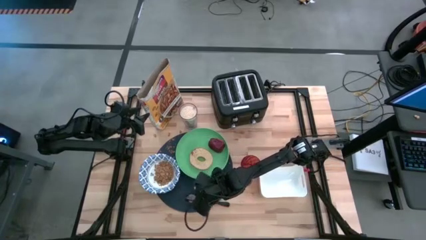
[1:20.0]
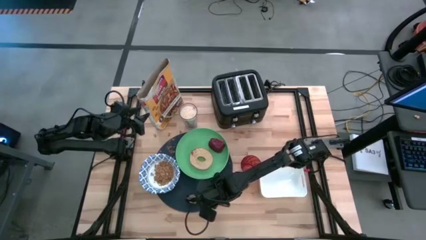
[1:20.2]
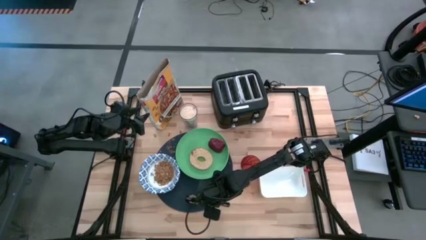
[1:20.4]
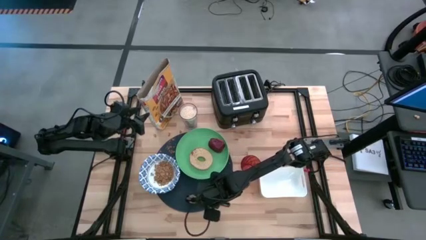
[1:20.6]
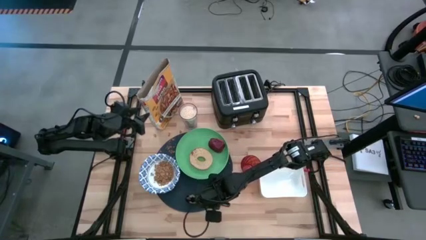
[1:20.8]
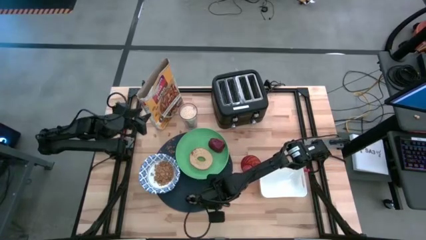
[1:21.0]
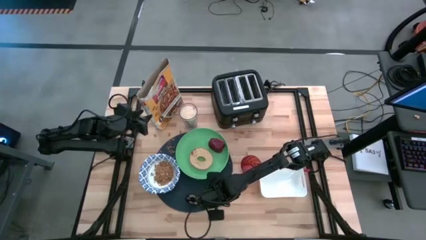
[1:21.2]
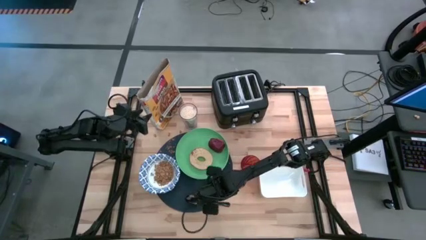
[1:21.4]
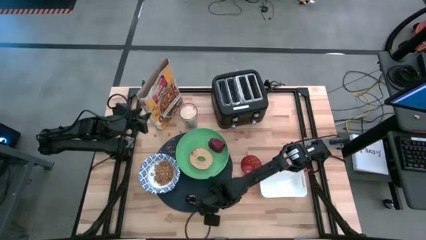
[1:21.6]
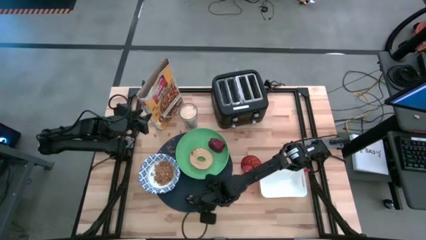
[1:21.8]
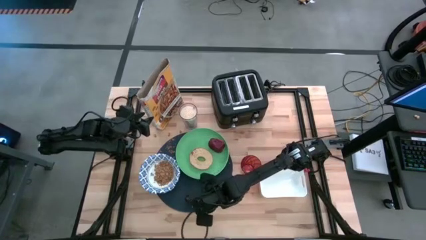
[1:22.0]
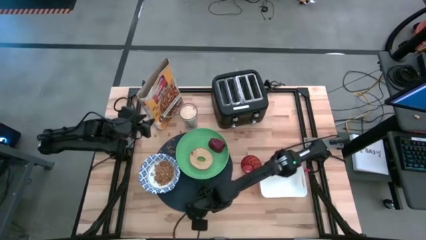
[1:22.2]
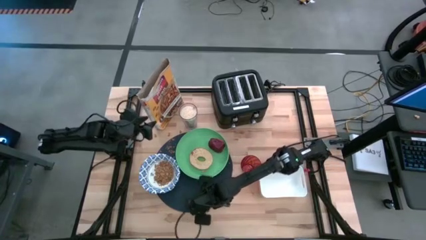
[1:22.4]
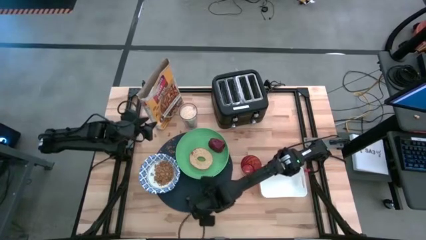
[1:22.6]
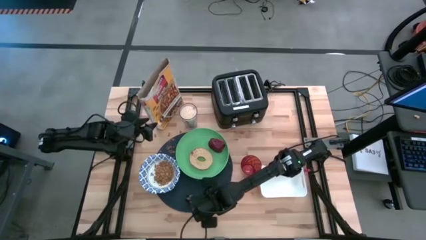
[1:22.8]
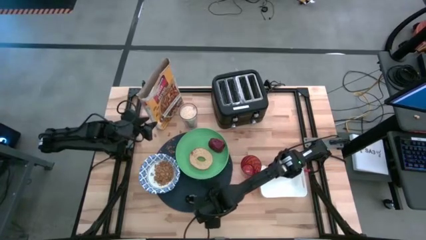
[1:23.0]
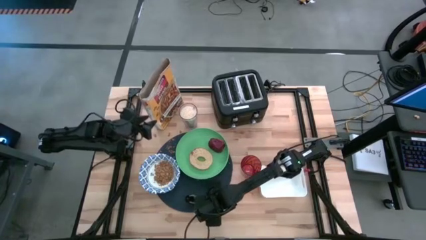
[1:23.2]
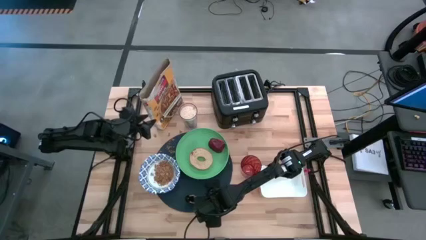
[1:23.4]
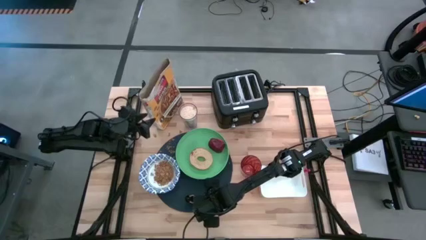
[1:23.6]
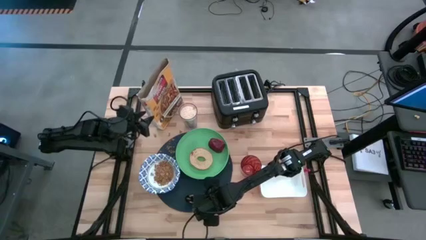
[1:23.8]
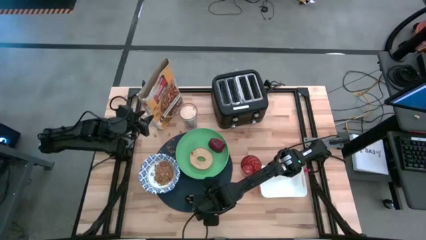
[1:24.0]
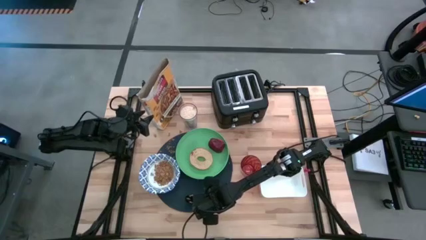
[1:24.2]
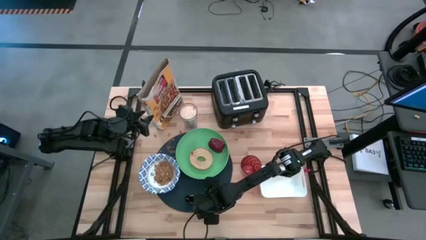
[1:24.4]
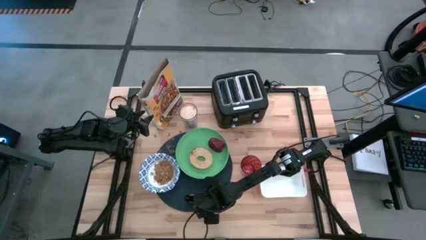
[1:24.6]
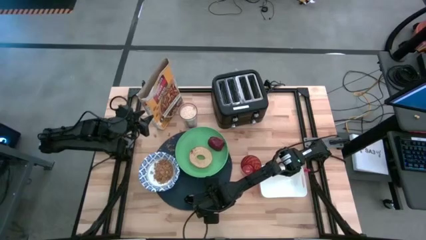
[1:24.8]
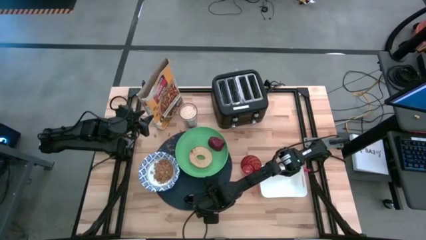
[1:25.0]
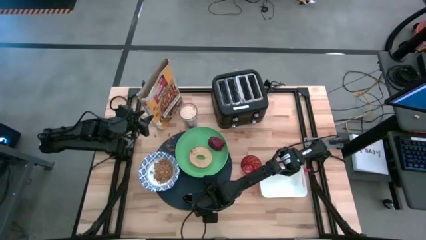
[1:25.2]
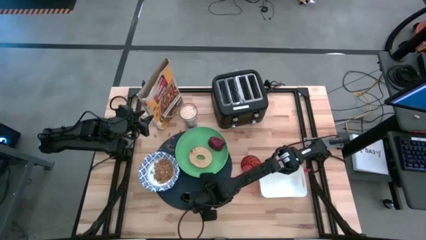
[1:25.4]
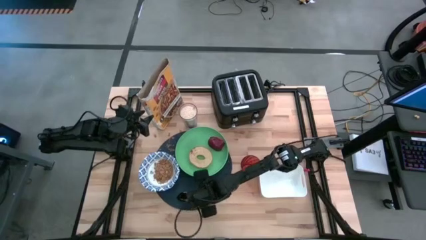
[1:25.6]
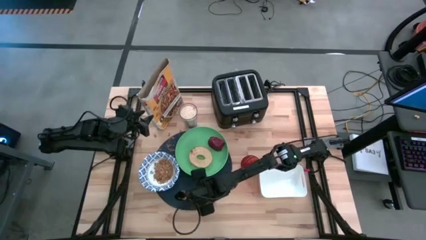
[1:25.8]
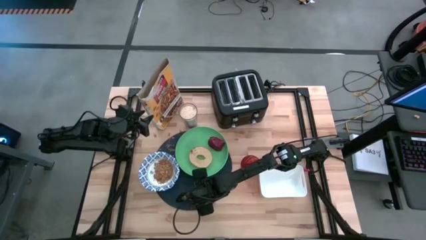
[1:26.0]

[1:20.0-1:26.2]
Task: Arrange a breakfast setting
Put the spoon on the black table mat at the bottom of the green plate

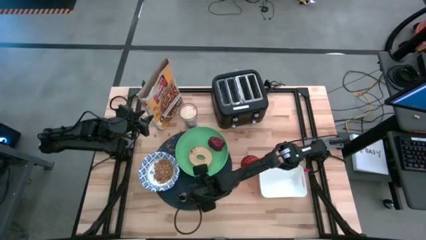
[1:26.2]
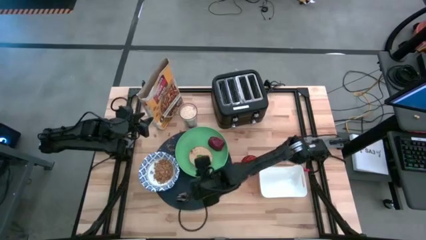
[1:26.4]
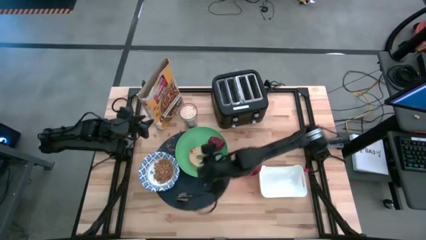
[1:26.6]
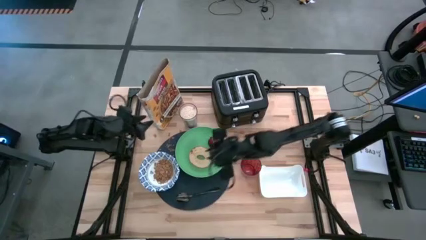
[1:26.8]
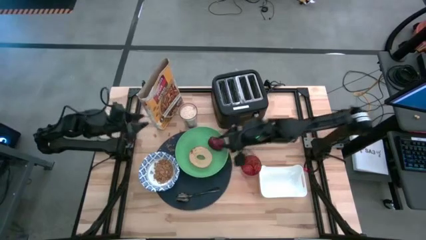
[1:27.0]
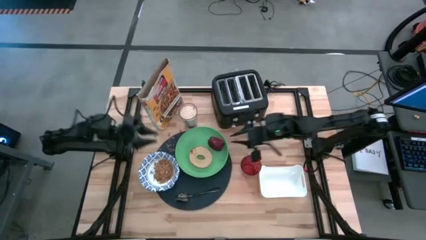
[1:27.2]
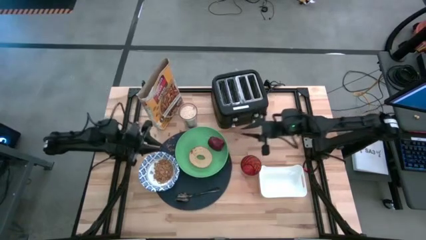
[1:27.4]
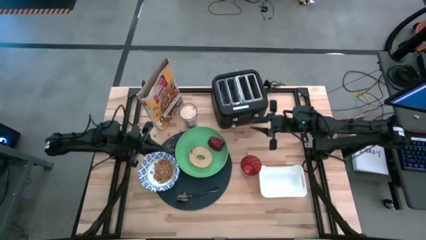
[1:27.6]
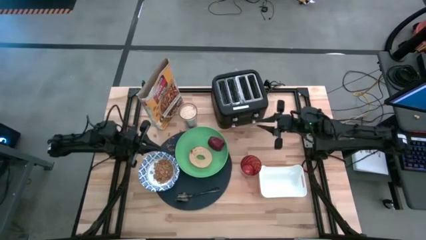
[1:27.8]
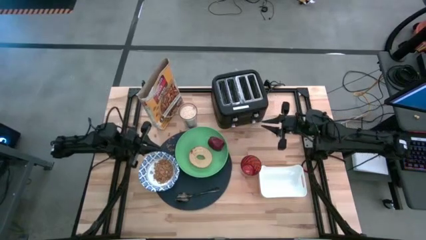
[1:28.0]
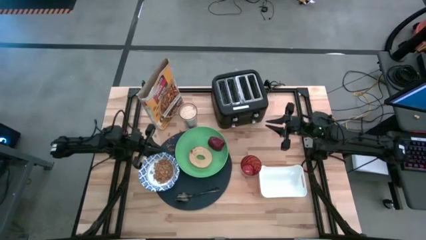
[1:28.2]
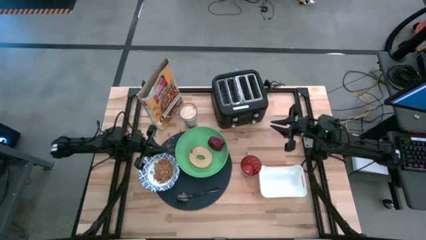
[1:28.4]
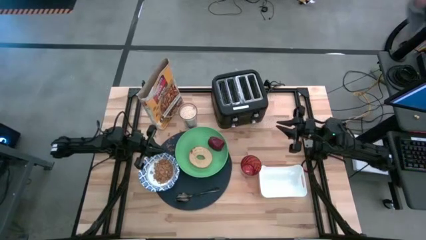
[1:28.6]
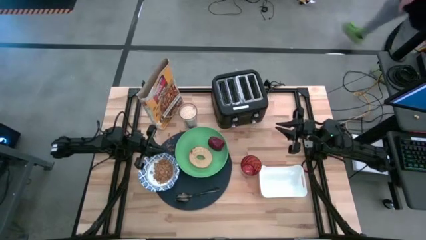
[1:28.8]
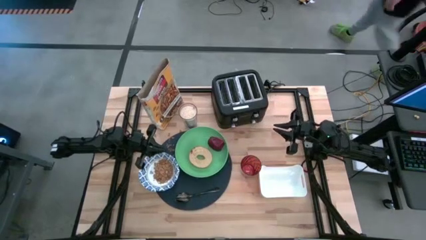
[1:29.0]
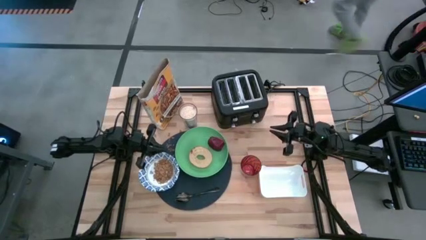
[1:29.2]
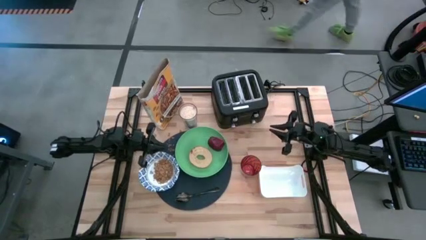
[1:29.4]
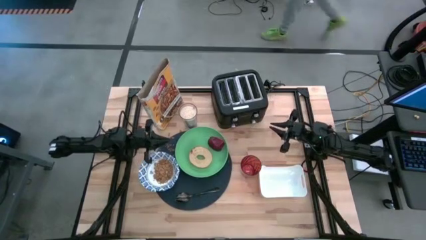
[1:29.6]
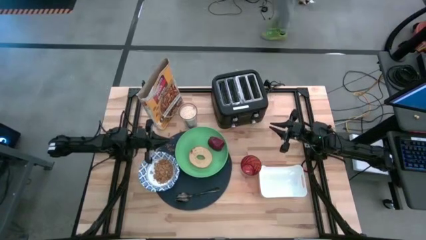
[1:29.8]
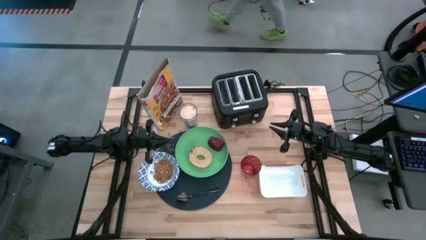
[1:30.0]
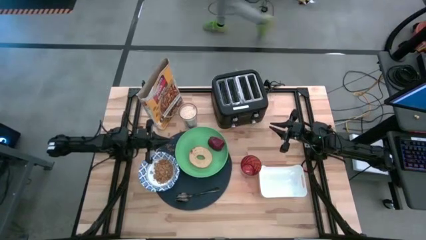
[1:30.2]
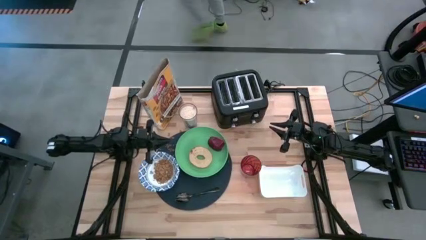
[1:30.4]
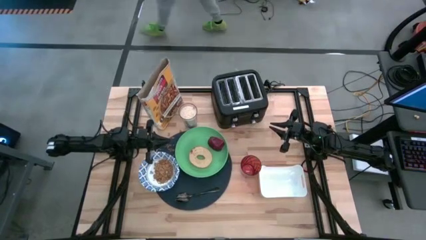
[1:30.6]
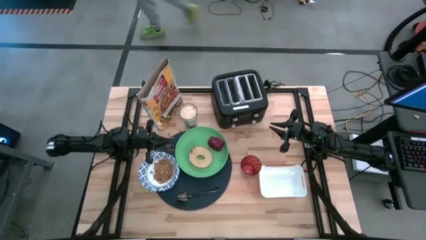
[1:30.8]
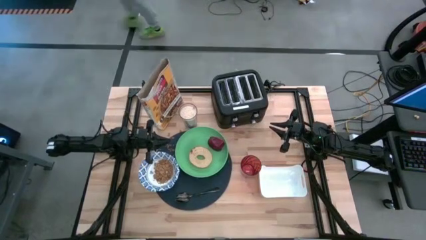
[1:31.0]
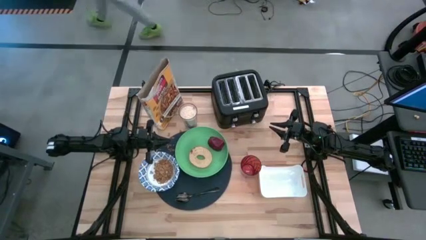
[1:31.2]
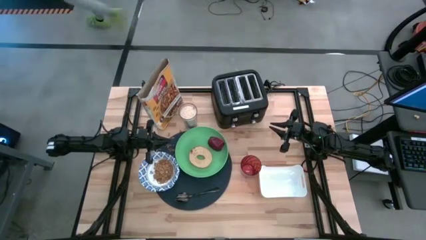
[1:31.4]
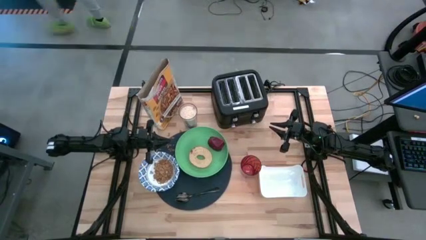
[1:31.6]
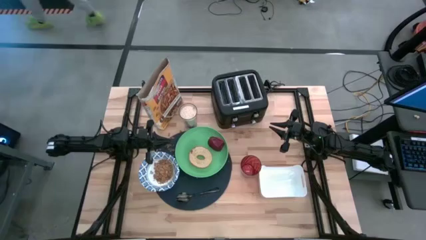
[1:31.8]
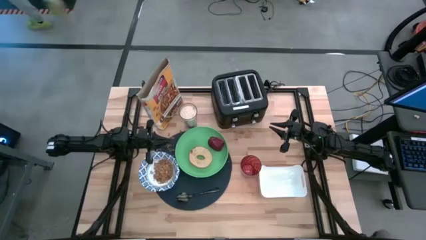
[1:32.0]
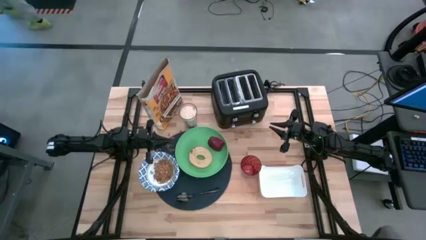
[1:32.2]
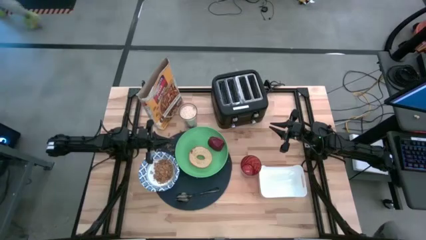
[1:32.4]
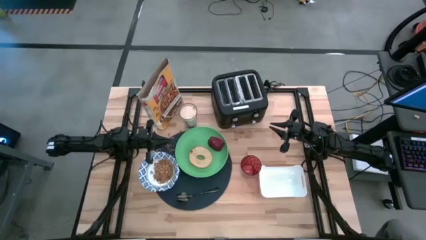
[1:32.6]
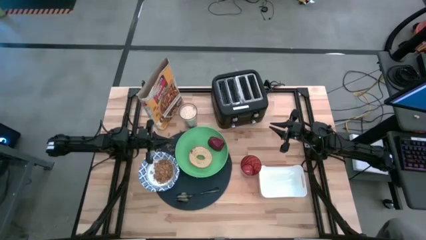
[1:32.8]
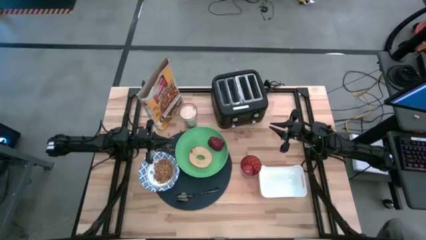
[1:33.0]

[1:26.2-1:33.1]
Return to Home Position

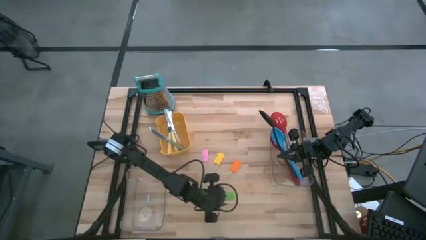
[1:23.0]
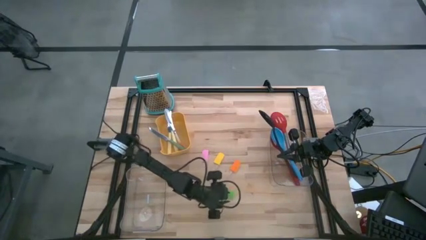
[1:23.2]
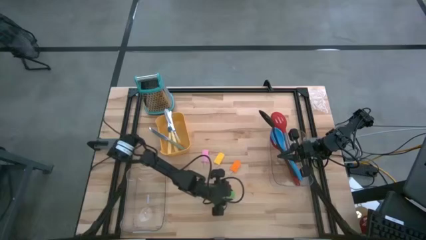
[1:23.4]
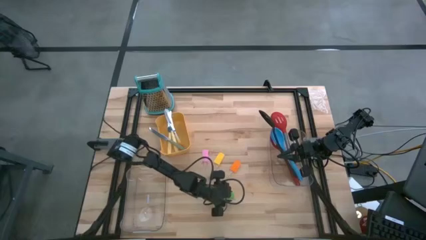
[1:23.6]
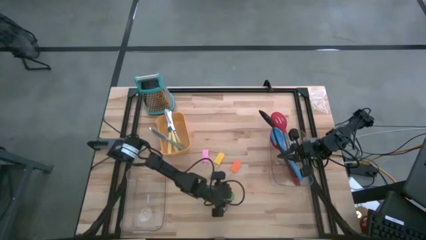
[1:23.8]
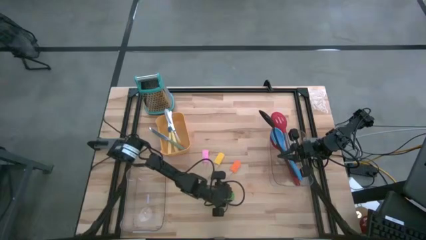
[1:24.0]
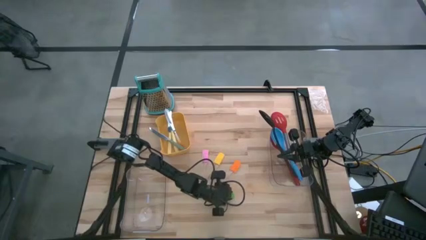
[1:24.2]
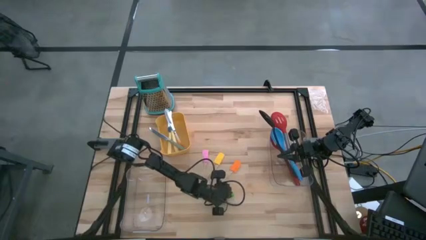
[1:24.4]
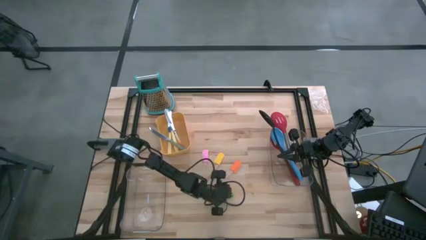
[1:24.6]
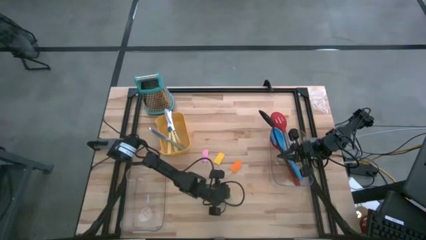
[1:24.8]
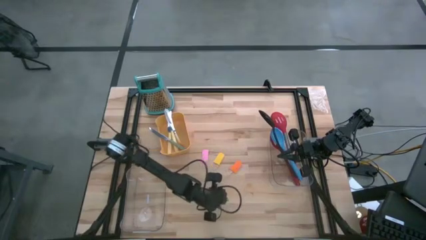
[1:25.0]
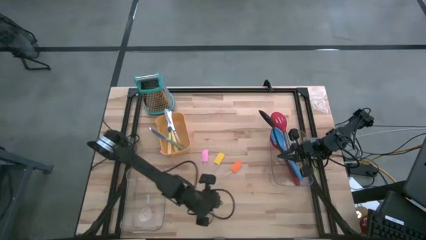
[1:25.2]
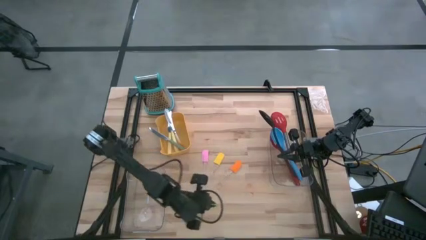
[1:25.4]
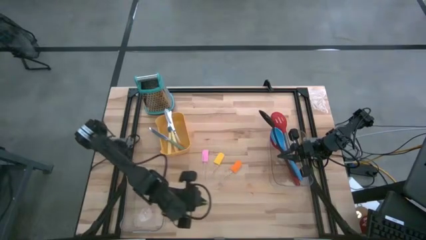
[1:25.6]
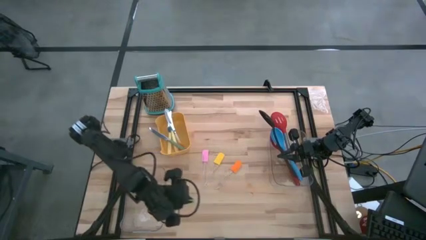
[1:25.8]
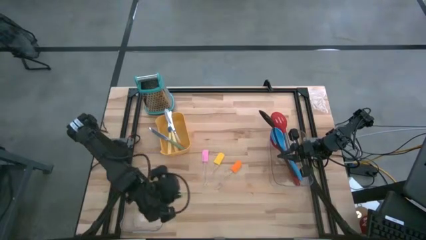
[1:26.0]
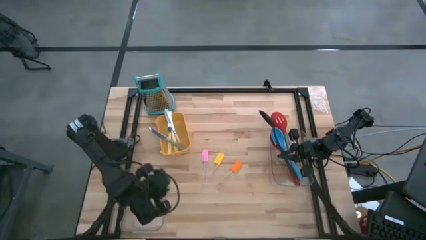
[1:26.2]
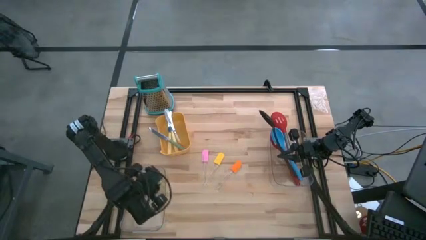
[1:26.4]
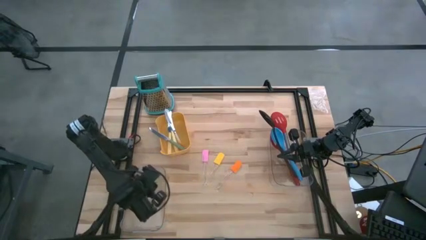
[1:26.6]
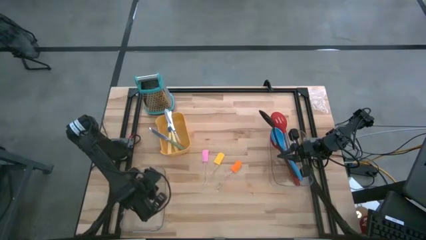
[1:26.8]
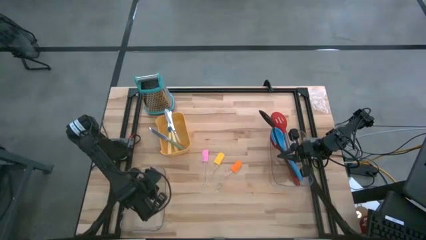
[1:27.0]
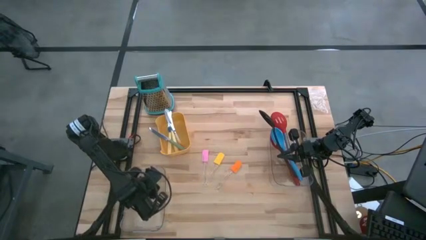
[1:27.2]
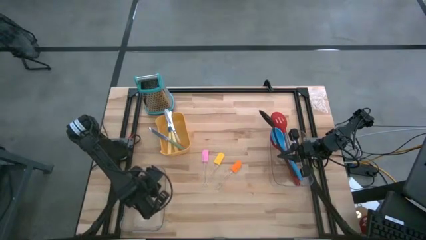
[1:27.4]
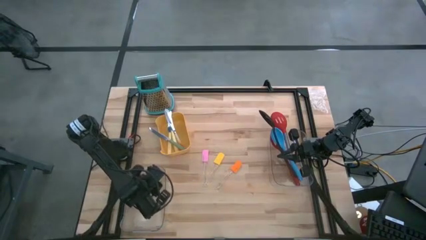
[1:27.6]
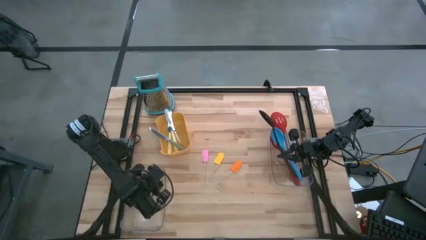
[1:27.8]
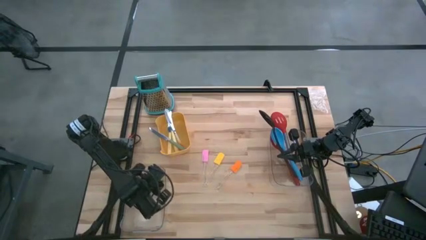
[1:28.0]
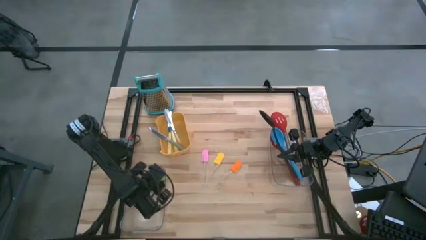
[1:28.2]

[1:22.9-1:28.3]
Task: Pick & Place Kitchen Items
Put the green spatula into the left transparent bin
